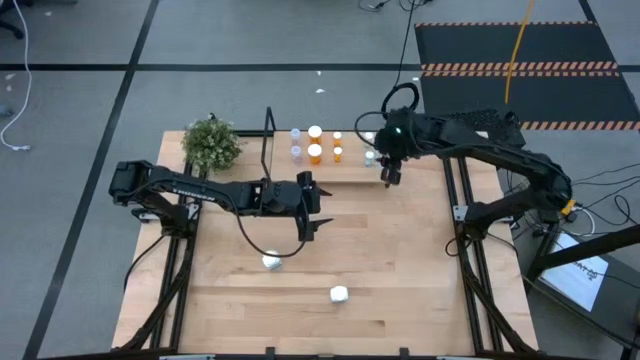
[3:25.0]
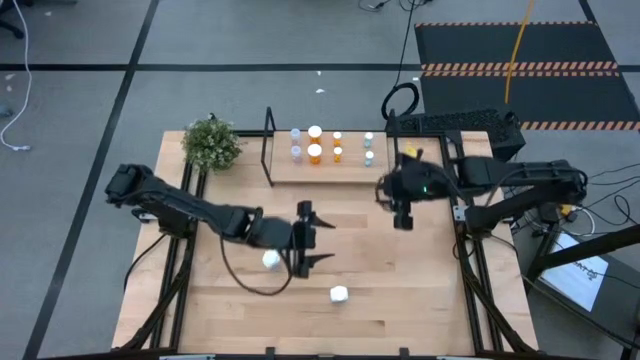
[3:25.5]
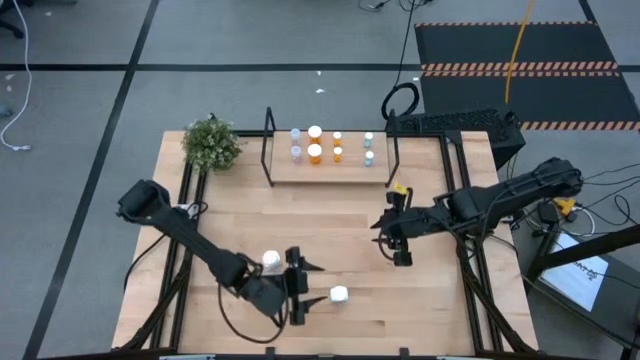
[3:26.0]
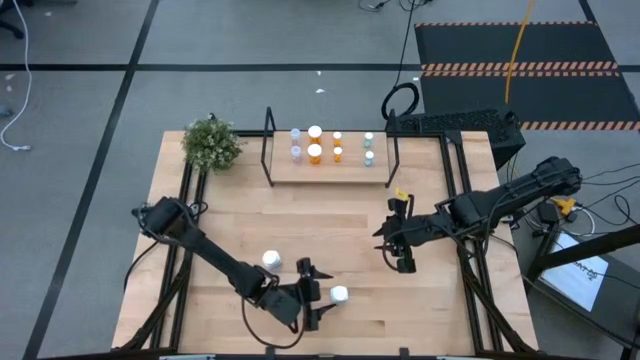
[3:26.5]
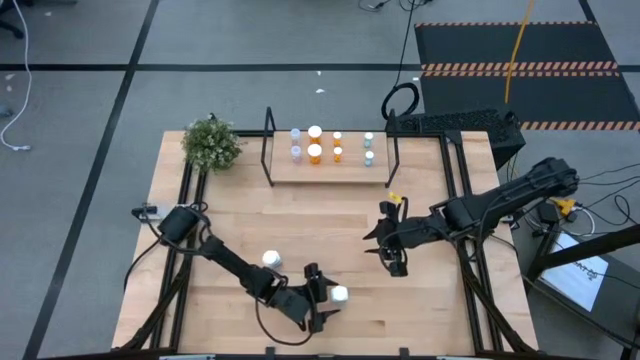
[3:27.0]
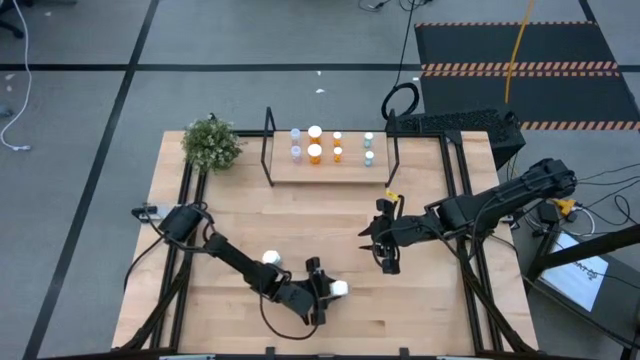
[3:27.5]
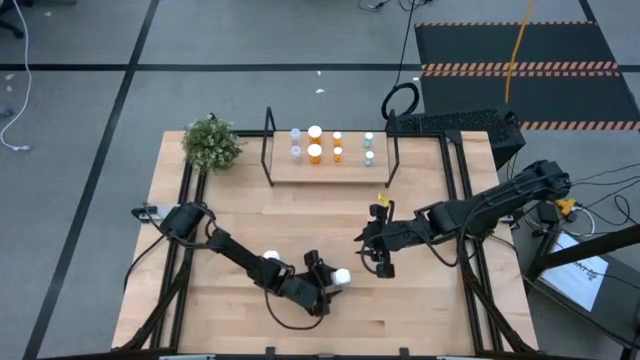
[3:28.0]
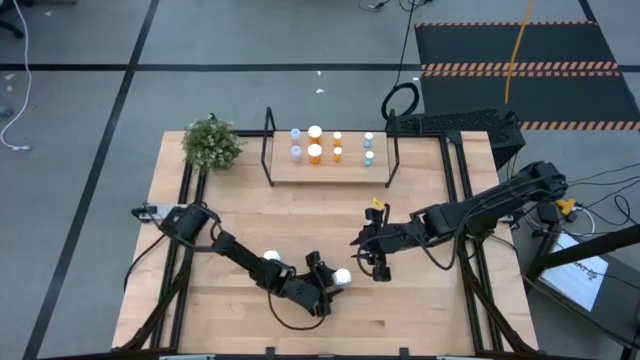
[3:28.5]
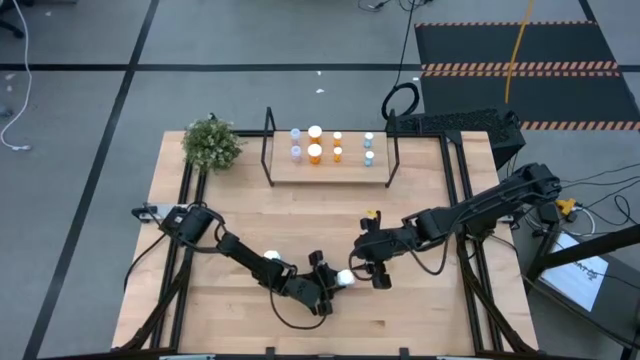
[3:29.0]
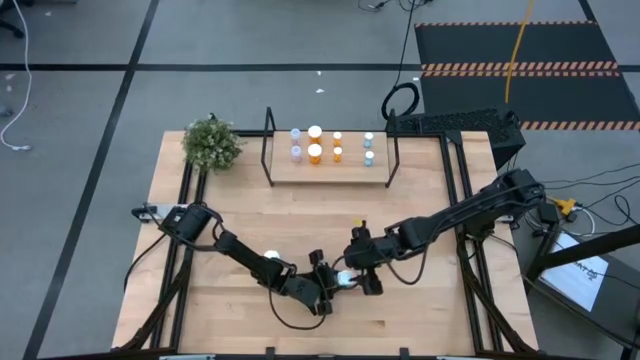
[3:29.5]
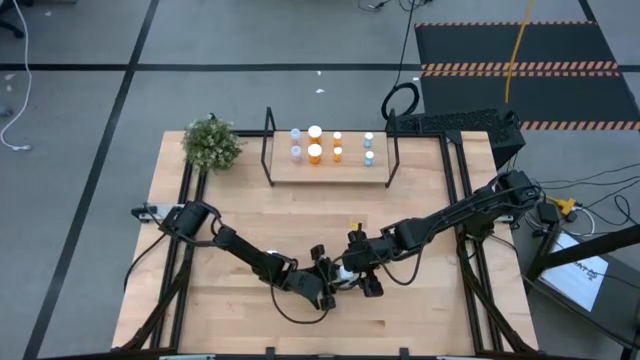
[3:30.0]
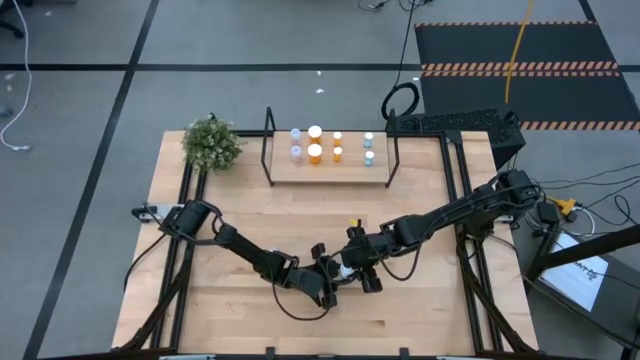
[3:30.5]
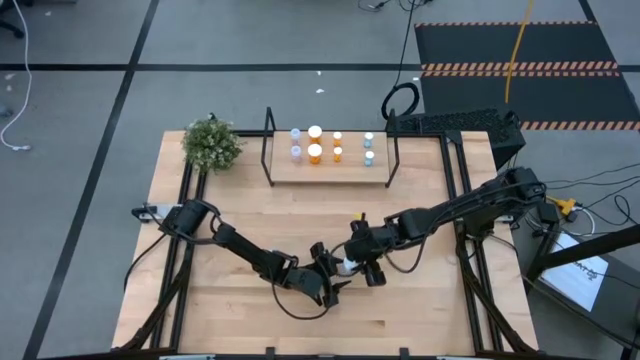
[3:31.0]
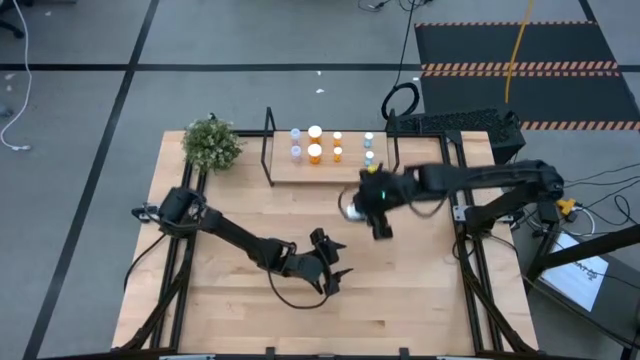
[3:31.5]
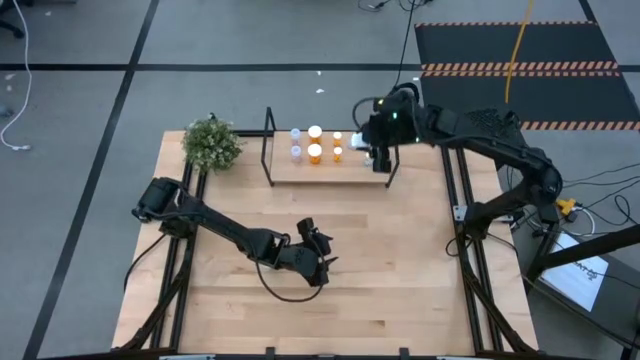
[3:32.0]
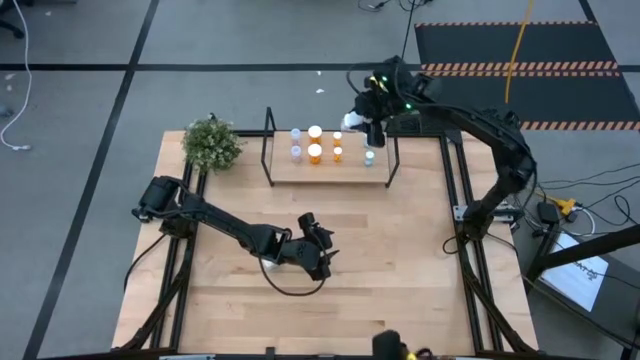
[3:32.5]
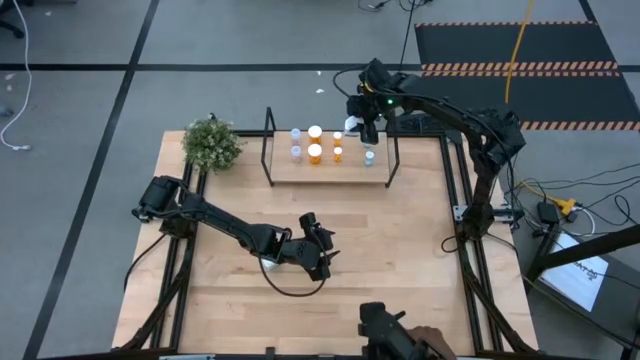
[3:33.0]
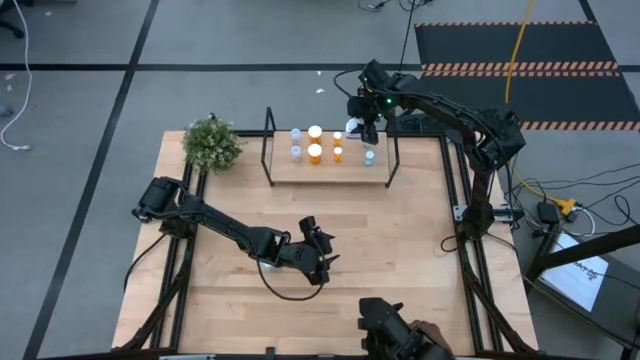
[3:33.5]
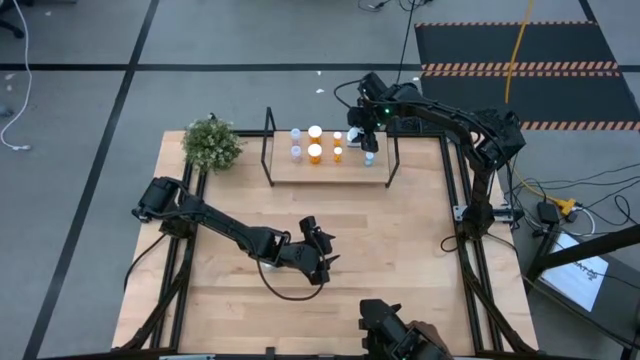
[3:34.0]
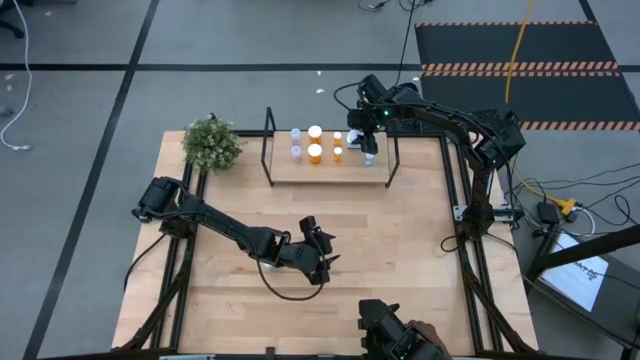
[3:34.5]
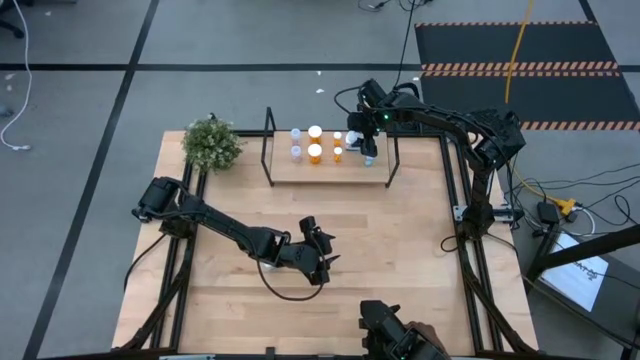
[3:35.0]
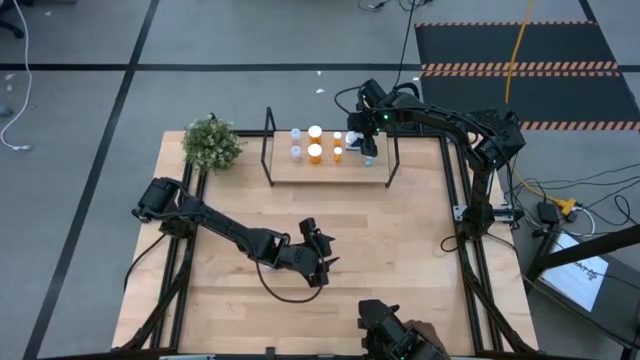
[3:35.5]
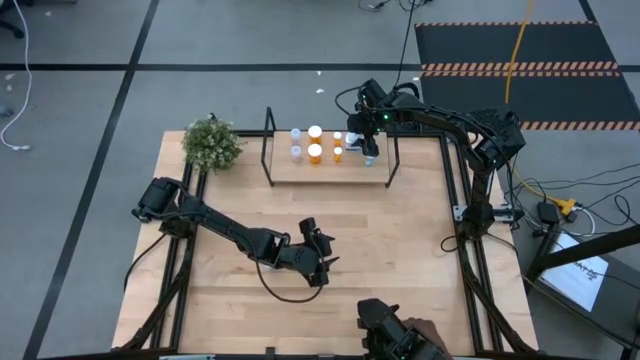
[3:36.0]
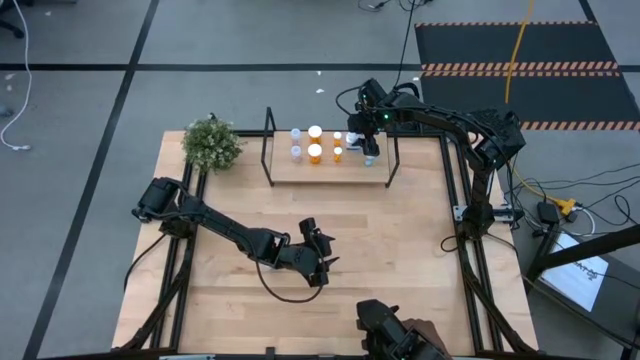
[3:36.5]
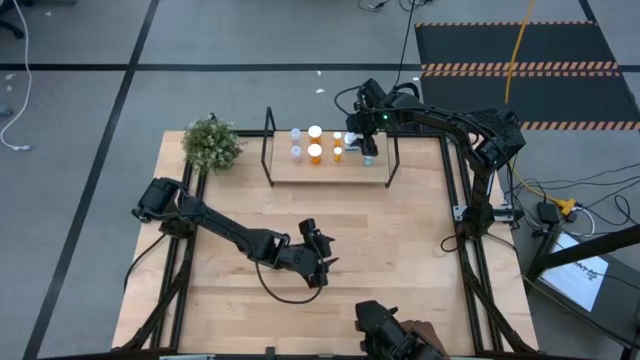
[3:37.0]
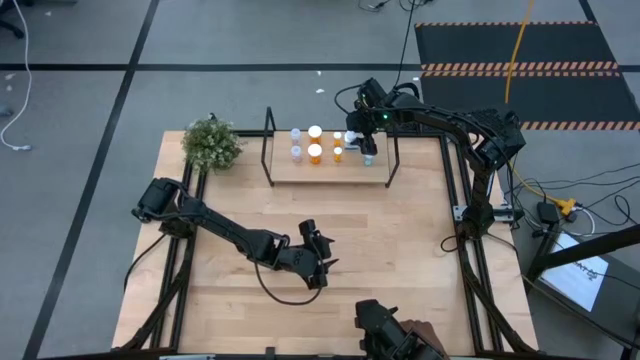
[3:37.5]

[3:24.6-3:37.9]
Task: Pick and place medicine bottles onto shelf by color
Put the right white pill bottle on the shelf

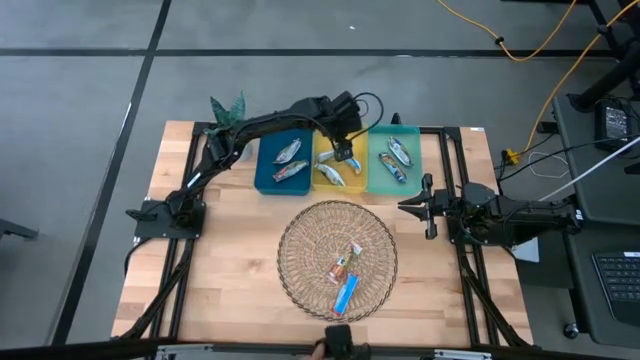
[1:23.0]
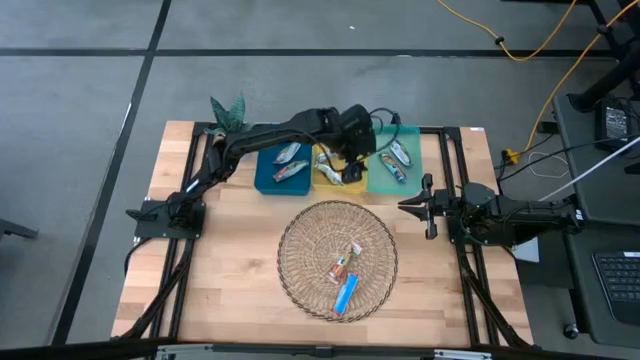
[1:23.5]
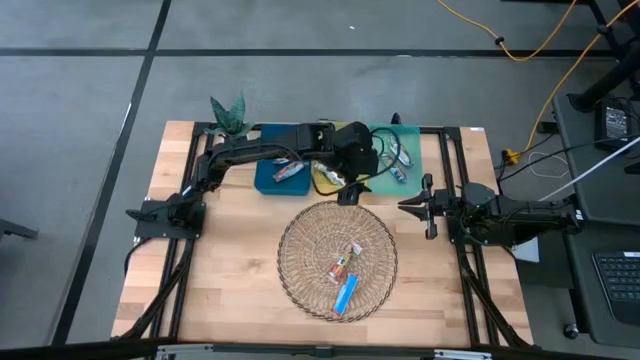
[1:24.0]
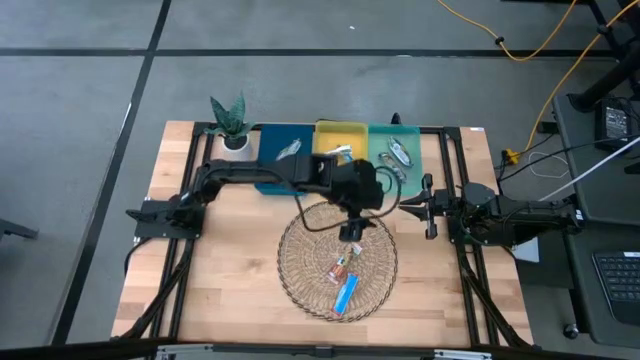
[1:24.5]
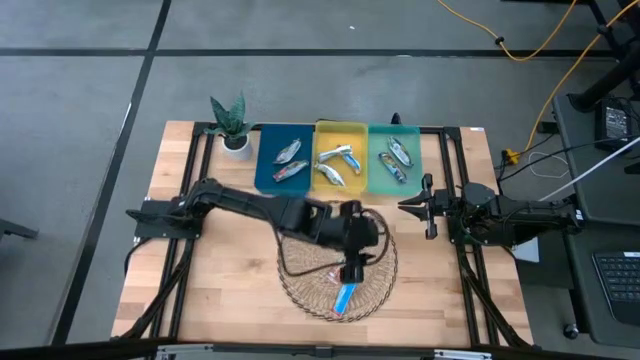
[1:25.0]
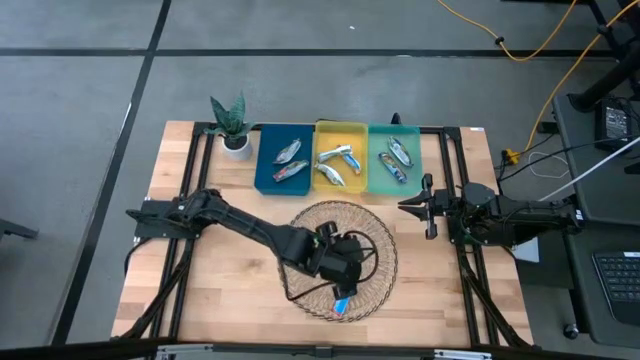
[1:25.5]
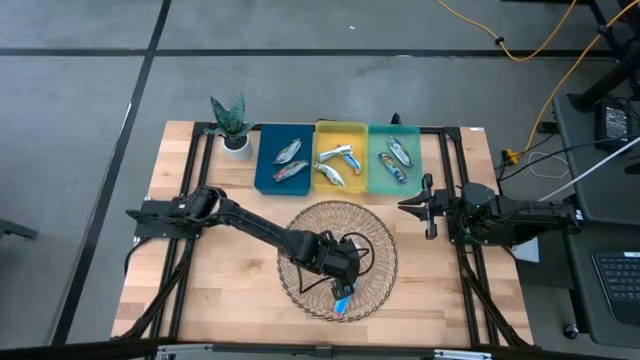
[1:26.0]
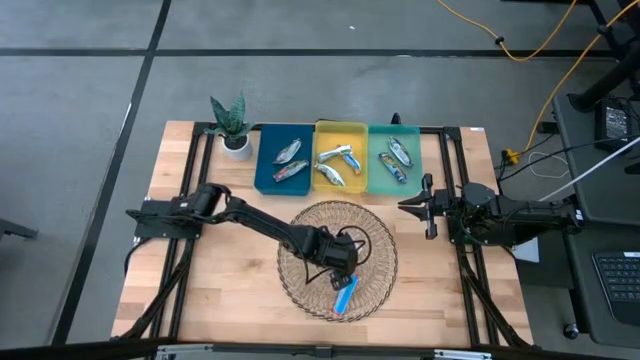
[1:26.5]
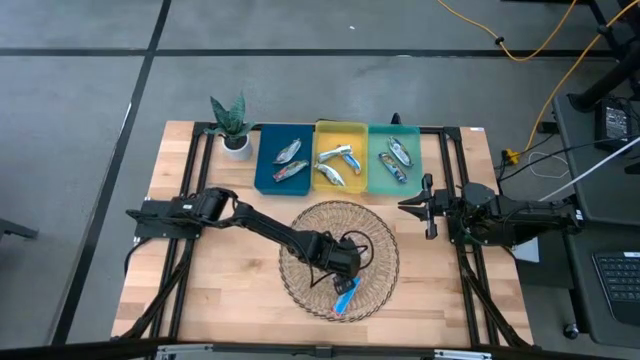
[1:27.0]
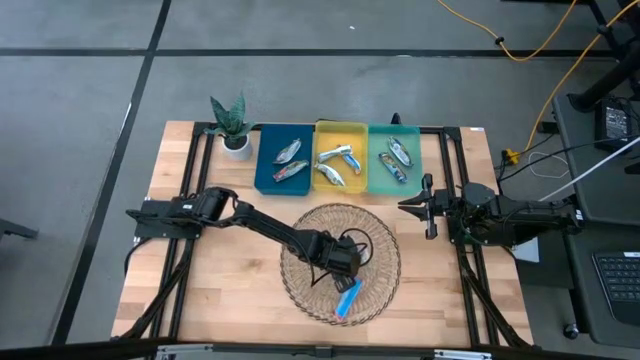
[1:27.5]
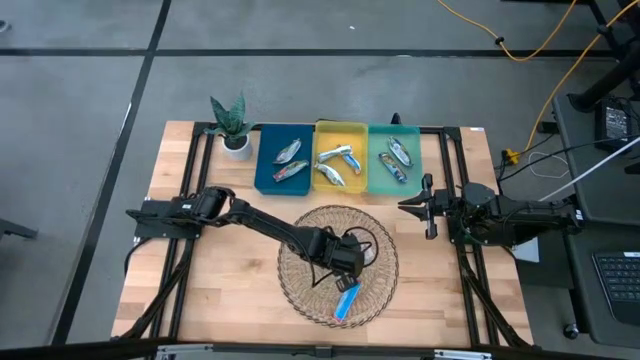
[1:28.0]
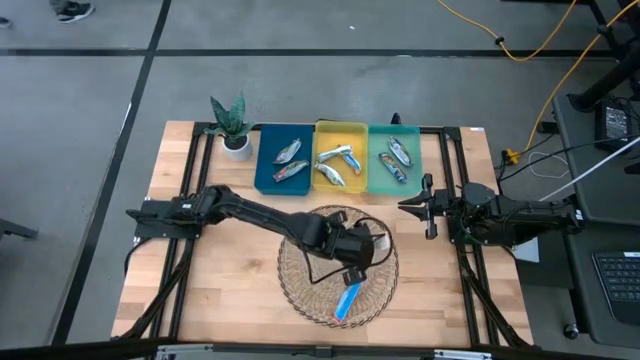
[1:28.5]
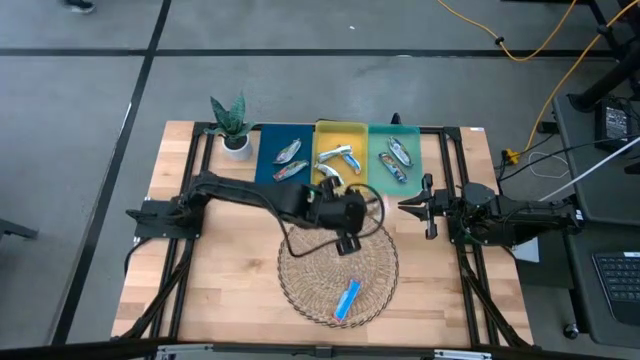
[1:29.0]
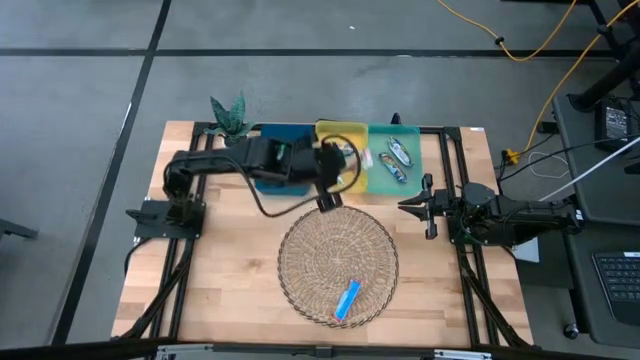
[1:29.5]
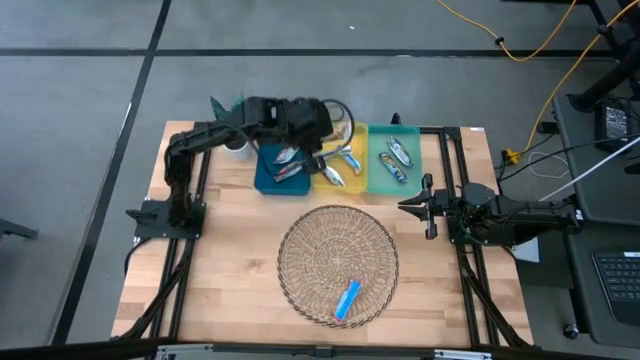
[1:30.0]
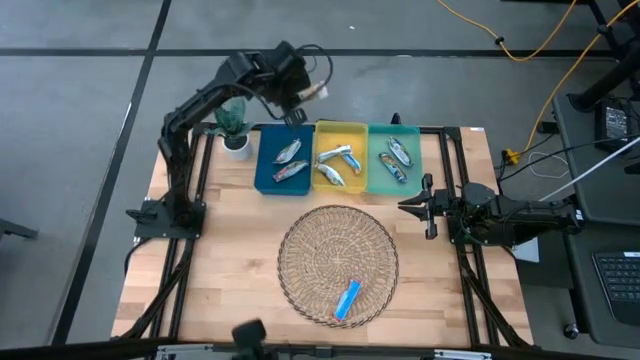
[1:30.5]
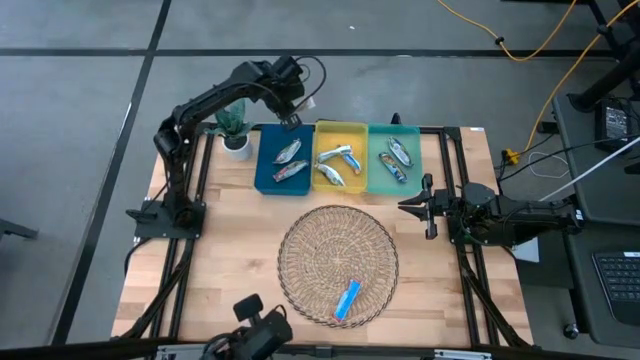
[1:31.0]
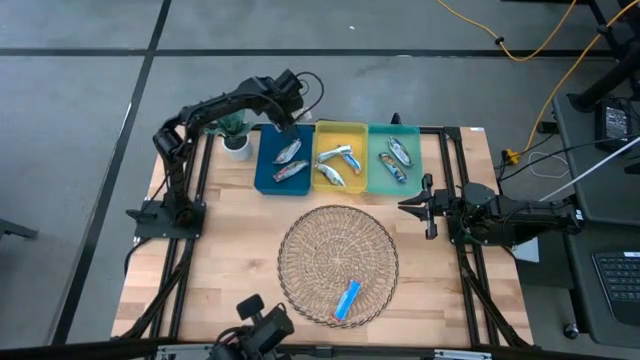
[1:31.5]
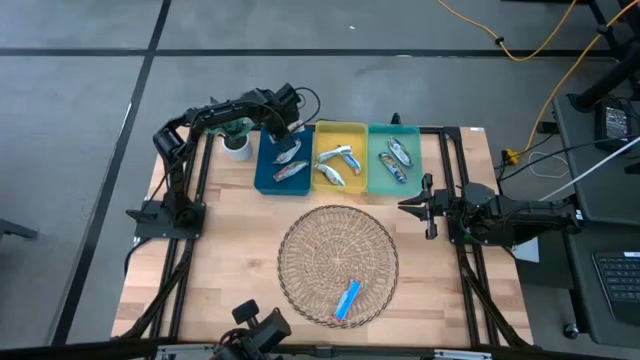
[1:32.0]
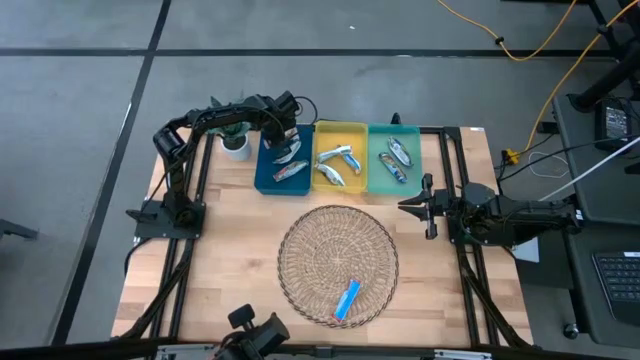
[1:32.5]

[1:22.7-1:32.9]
Task: Pick and place Granola Bars by type
Put the red granola bar into the blue bin
